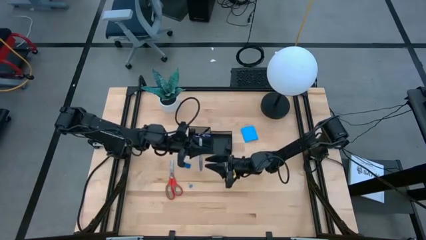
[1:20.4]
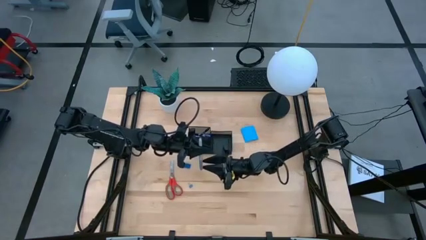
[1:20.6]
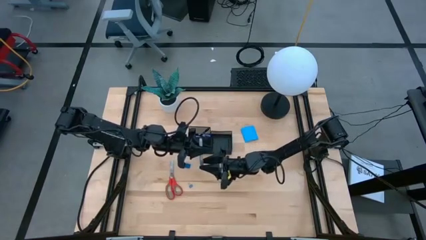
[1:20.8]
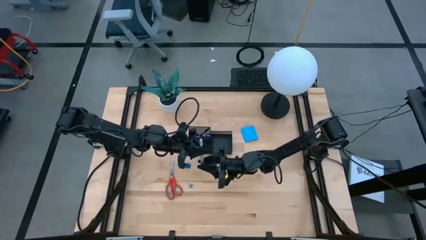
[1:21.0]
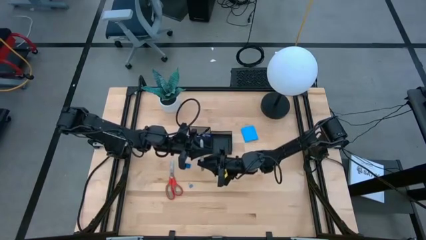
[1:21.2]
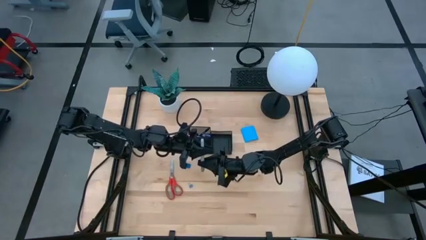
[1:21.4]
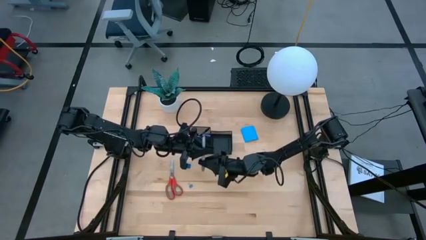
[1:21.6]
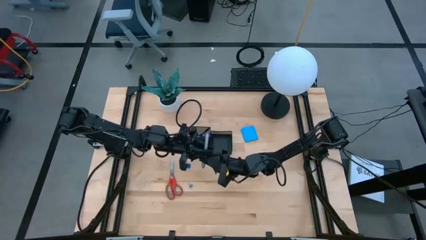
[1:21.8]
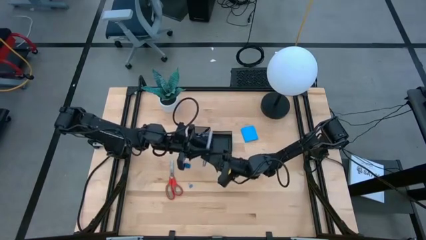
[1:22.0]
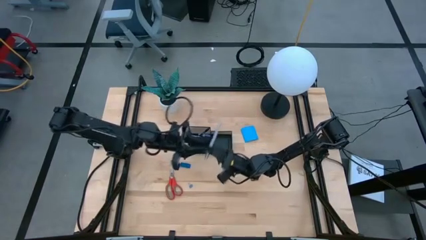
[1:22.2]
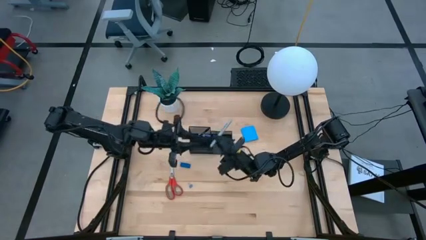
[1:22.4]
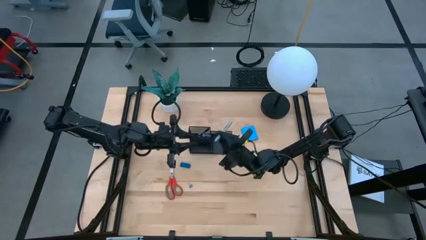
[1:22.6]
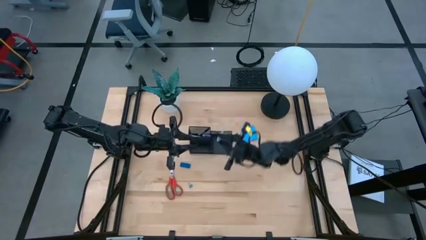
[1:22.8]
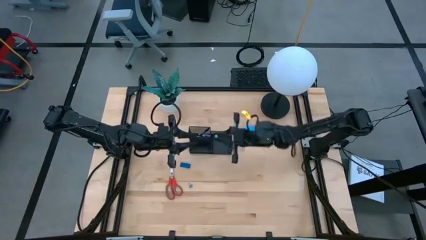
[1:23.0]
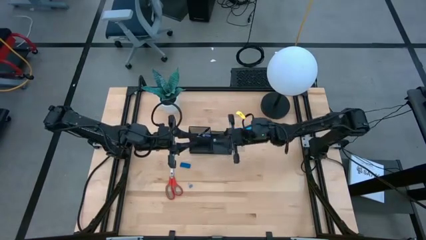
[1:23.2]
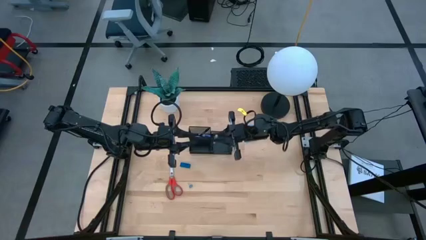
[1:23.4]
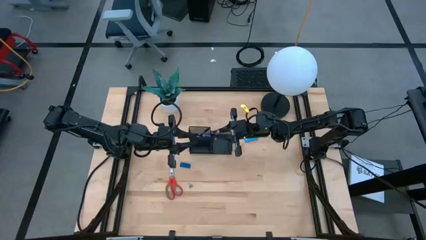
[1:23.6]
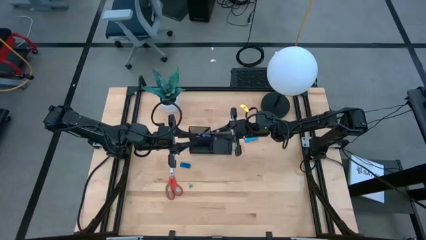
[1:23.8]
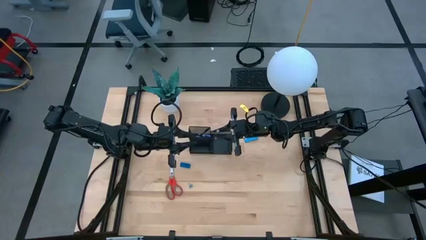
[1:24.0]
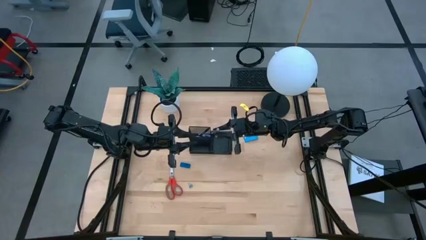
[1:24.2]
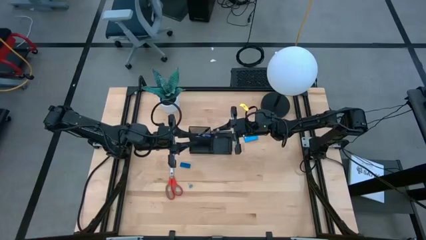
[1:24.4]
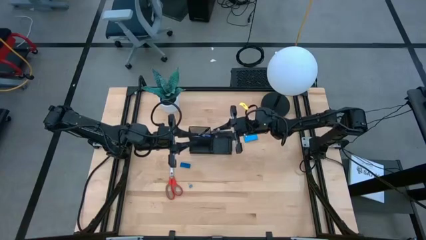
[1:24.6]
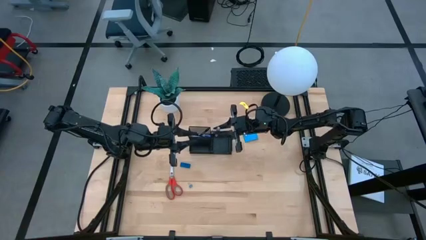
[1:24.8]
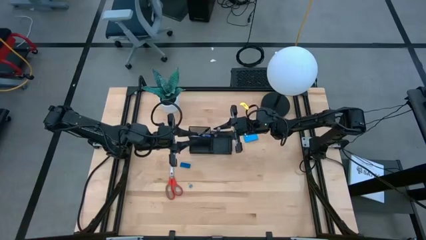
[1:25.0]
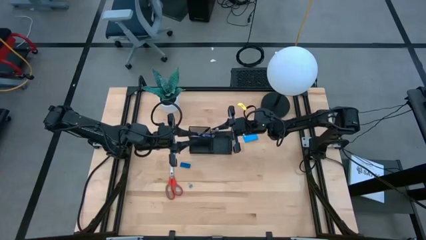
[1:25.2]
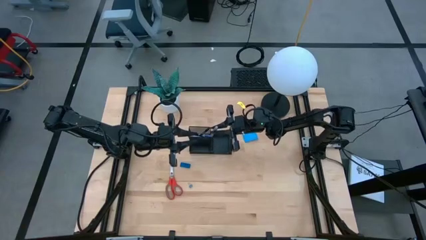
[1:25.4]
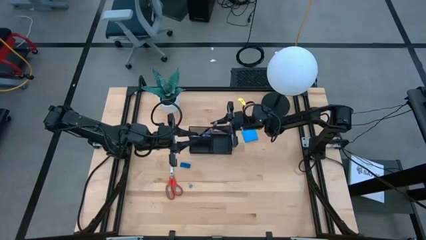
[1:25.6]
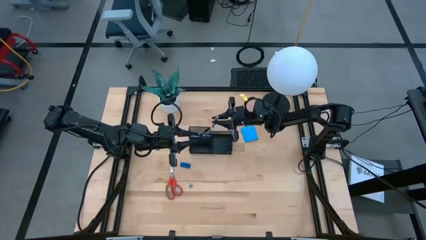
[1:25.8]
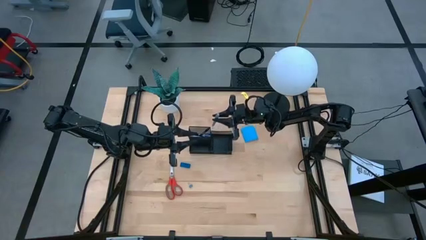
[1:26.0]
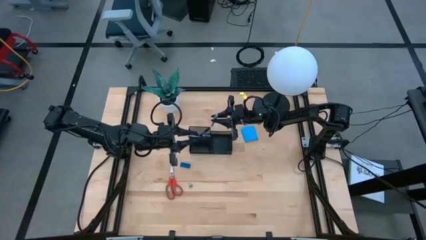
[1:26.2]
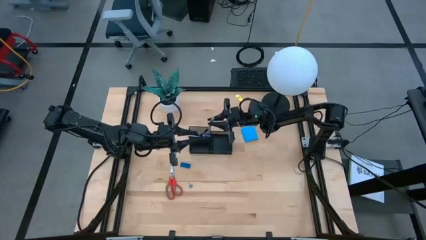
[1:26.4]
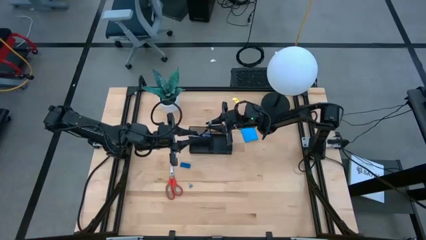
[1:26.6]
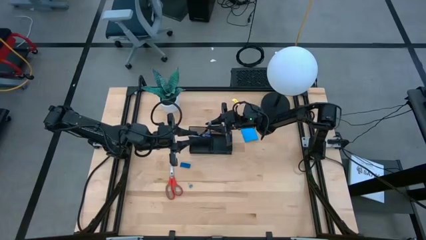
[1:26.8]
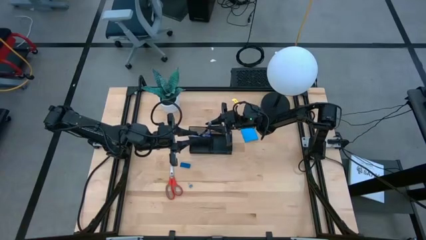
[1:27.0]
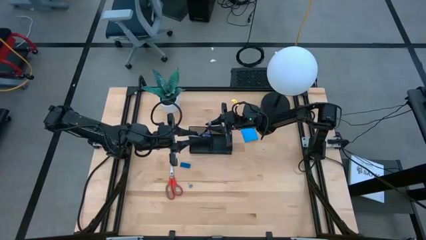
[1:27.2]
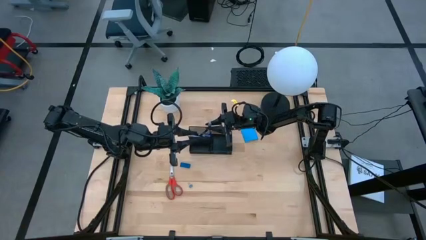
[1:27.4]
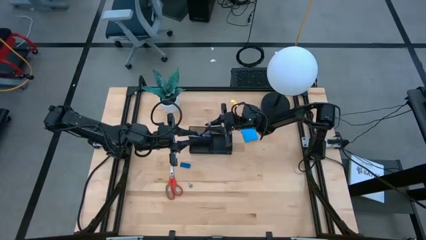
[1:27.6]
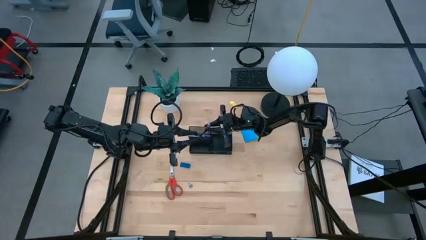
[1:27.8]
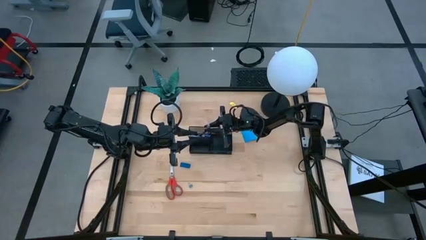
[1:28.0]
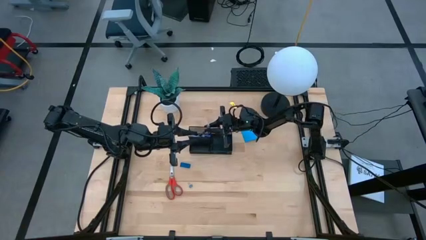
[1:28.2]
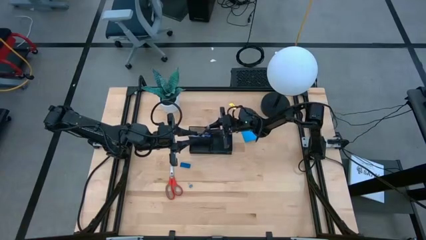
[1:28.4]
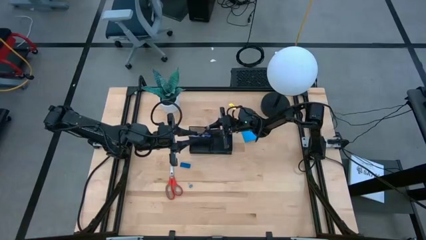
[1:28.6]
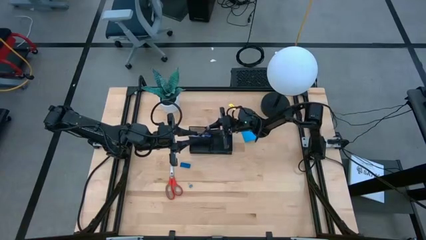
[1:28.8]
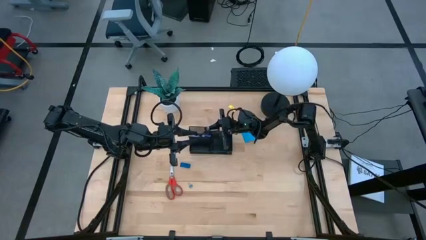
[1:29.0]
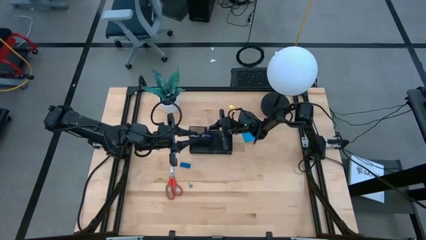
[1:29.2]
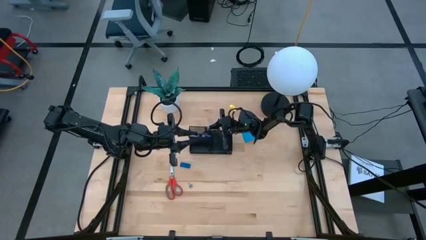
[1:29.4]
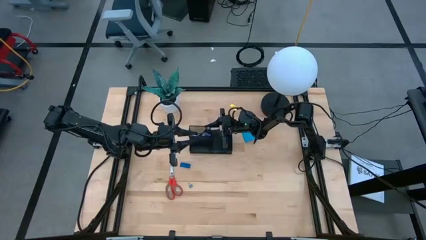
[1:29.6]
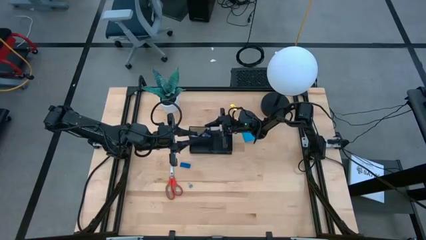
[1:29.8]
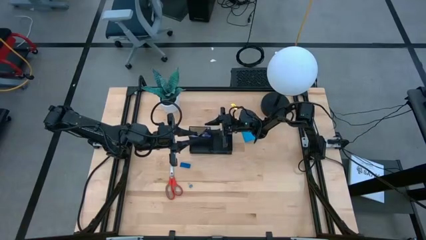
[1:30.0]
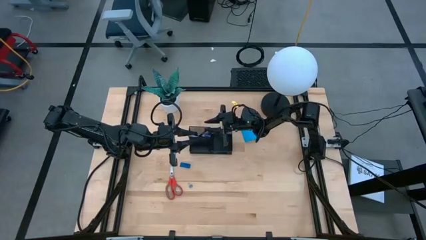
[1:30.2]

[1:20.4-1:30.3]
Task: Pick and place office supplies into organizer
Put the gray marker into the black desk organizer

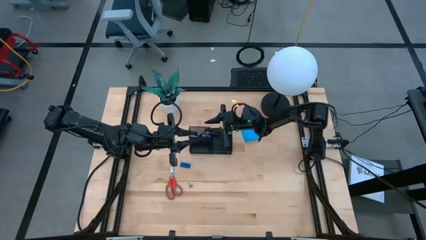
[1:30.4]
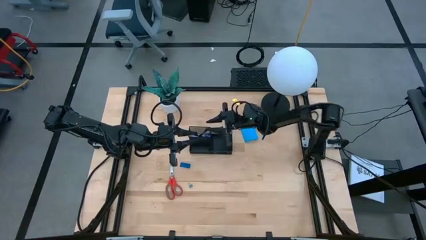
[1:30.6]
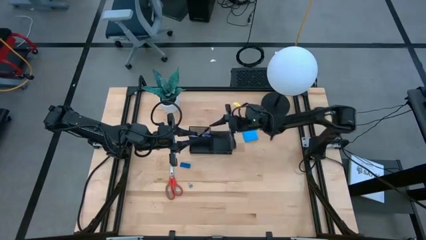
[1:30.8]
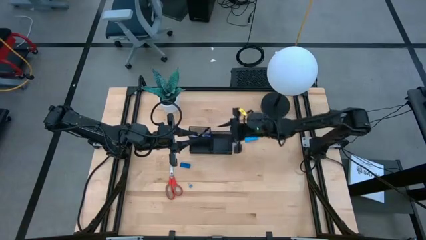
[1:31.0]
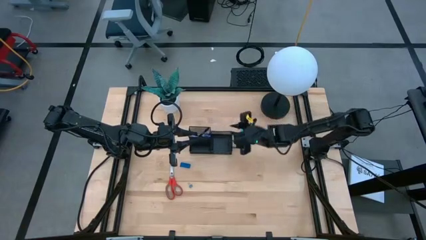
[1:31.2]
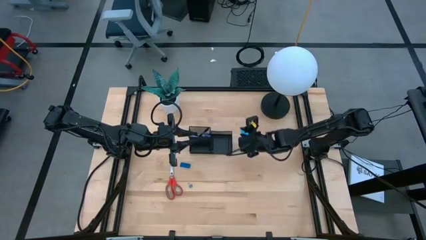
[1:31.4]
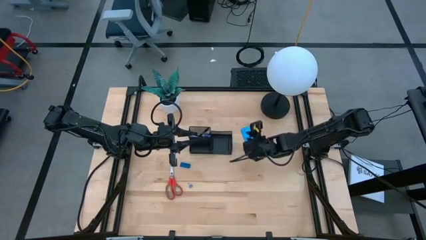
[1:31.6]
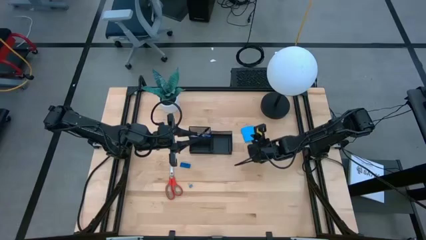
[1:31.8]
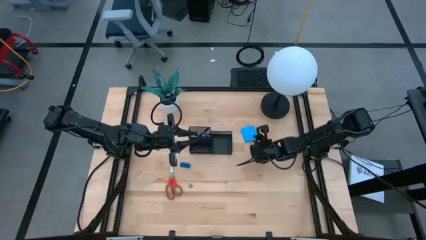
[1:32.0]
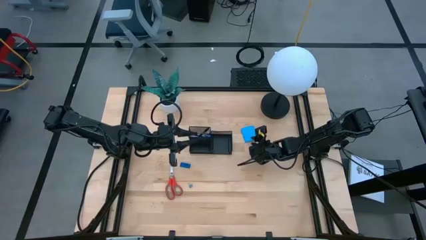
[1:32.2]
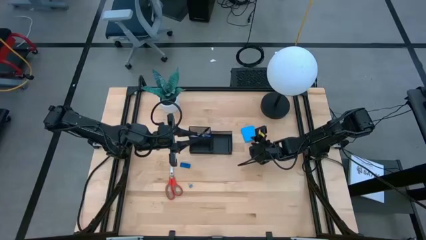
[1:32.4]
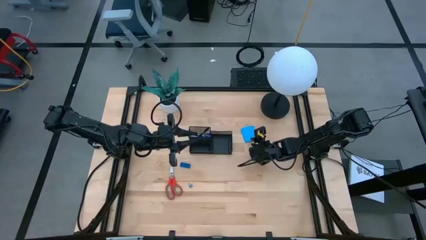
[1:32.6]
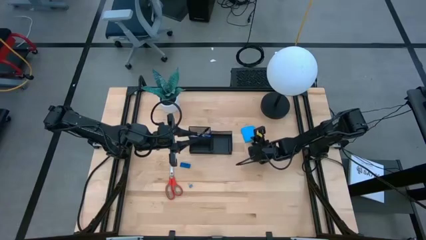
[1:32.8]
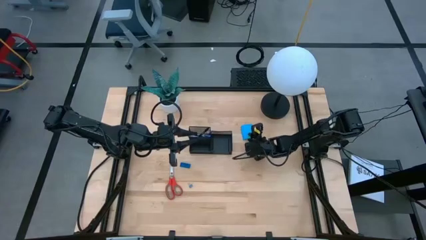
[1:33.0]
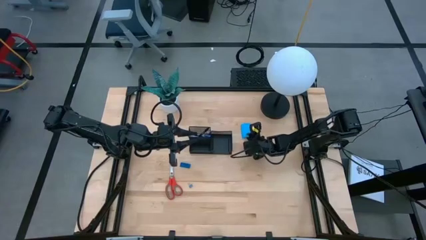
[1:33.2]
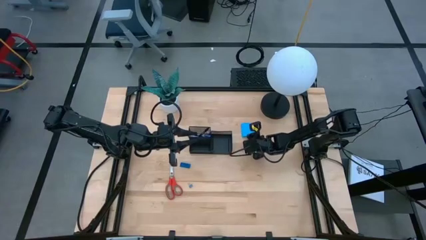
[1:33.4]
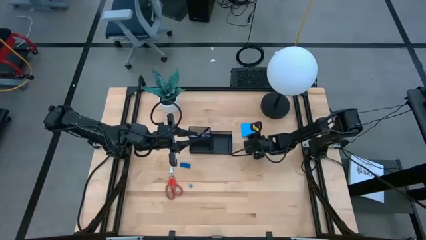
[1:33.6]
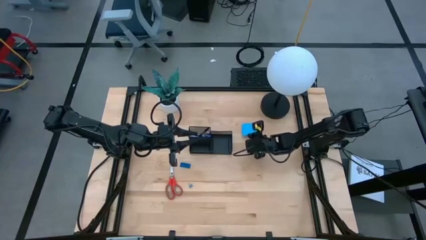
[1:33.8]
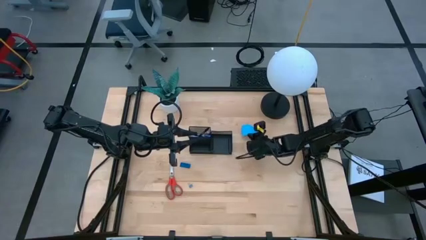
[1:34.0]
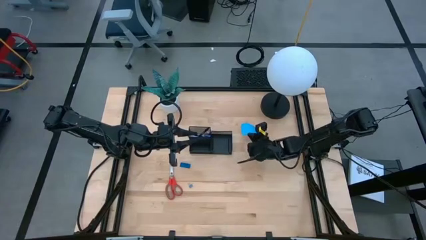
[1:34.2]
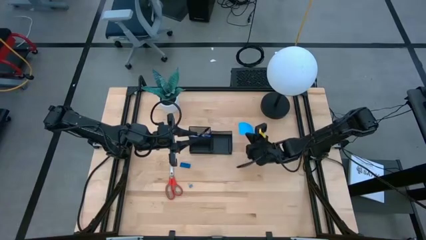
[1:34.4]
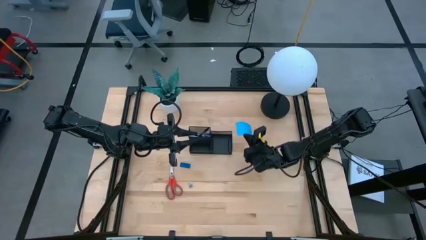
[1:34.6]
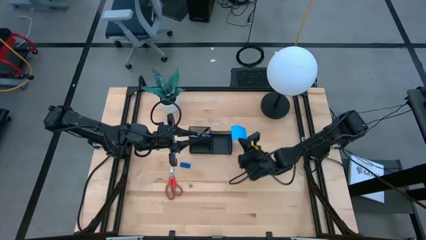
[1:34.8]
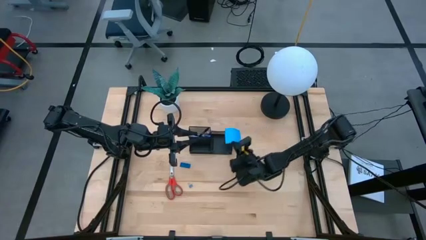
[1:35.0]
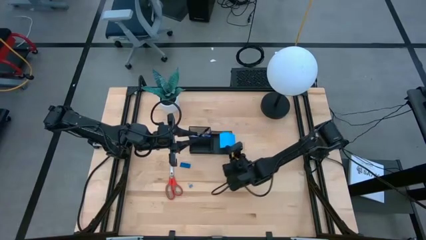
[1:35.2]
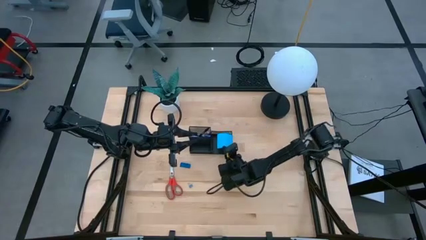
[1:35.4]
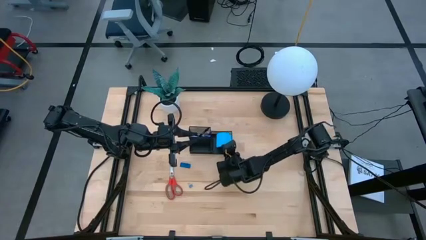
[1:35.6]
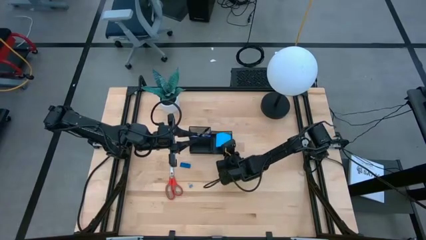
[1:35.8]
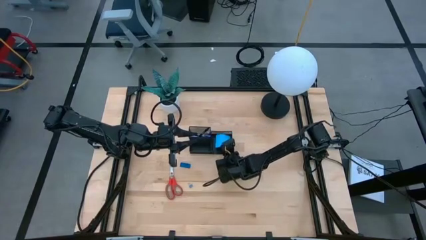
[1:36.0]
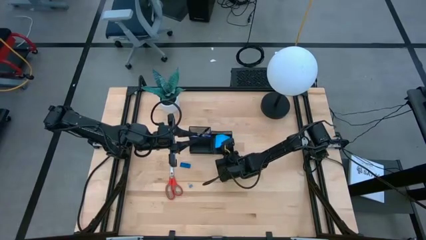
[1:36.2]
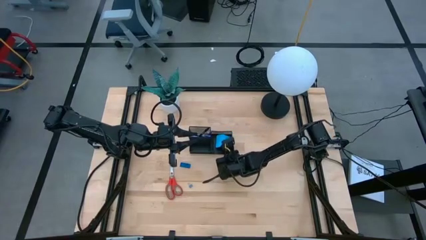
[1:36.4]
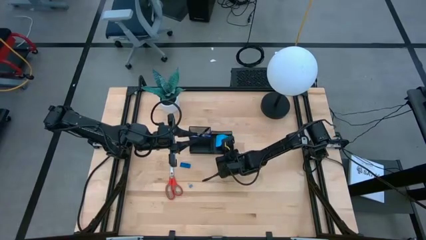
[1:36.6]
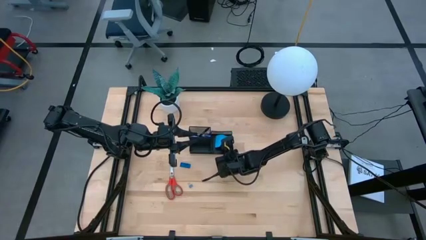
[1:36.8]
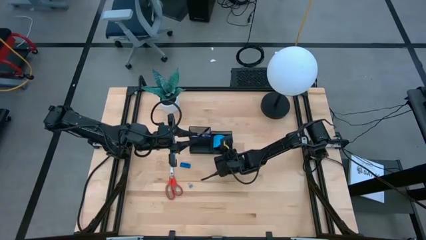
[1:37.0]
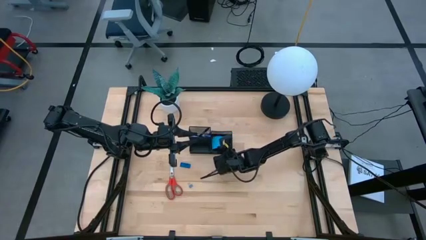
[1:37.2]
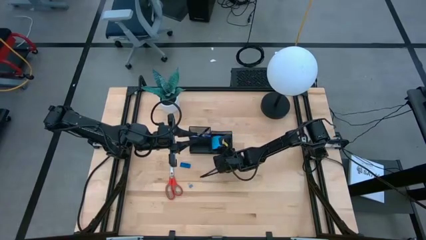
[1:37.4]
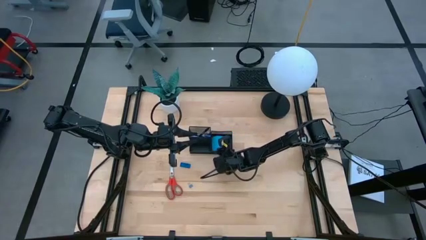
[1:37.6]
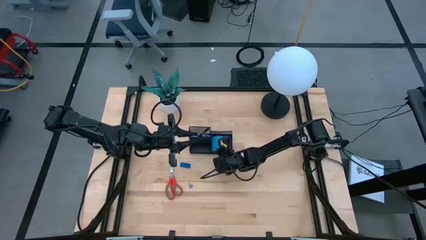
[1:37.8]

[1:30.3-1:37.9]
Put the blue sticky notes into the black desk organizer
